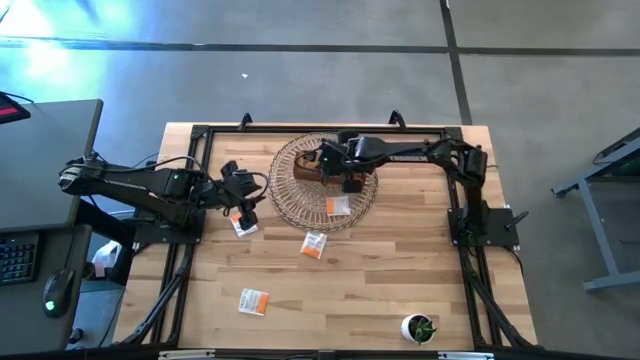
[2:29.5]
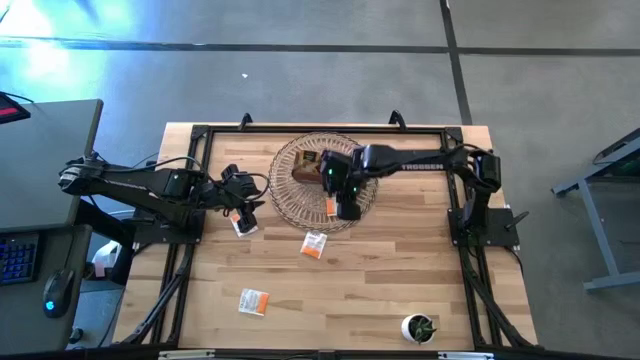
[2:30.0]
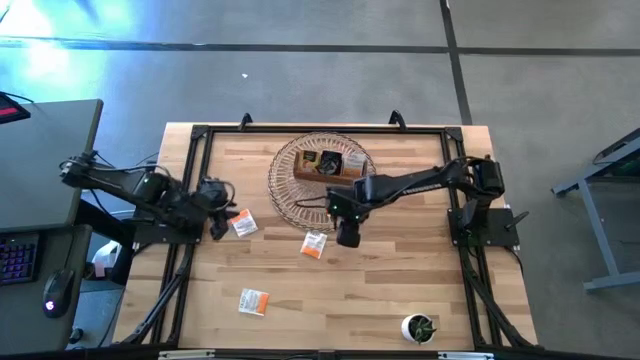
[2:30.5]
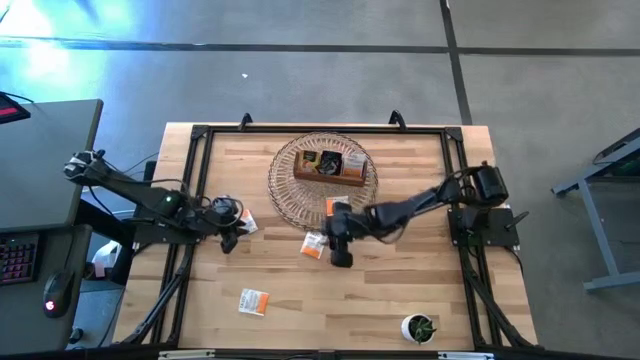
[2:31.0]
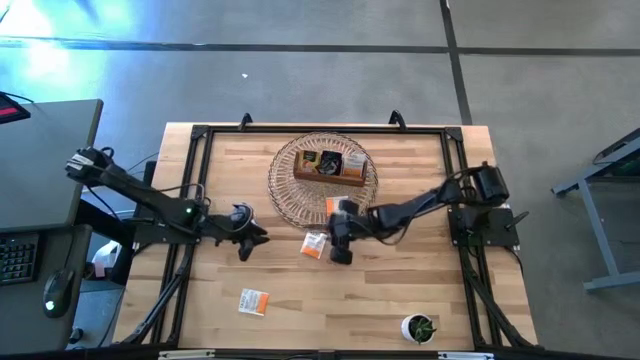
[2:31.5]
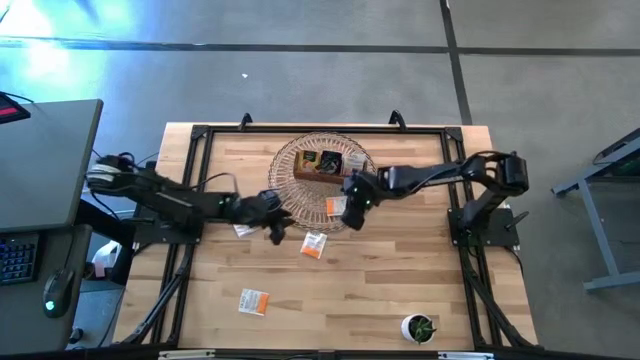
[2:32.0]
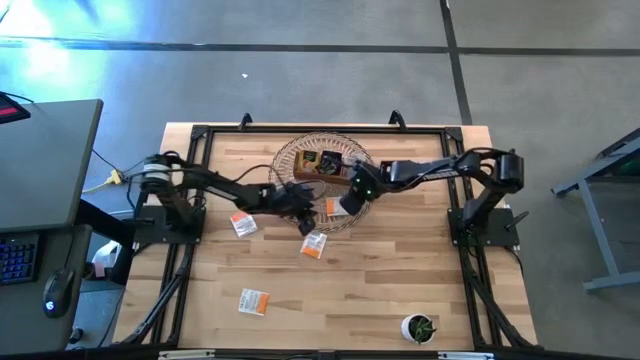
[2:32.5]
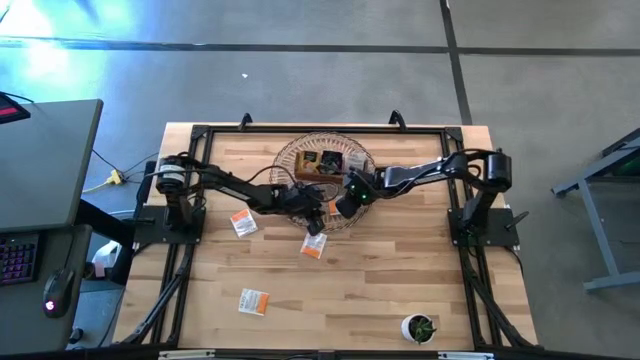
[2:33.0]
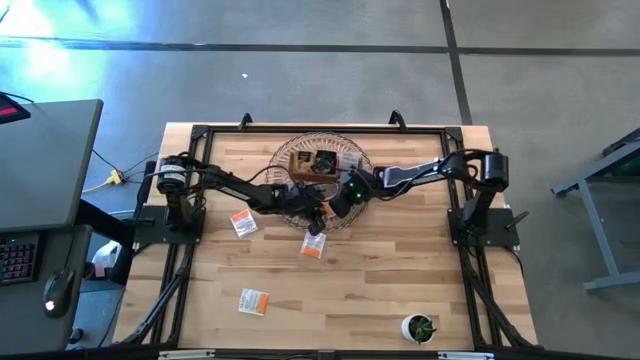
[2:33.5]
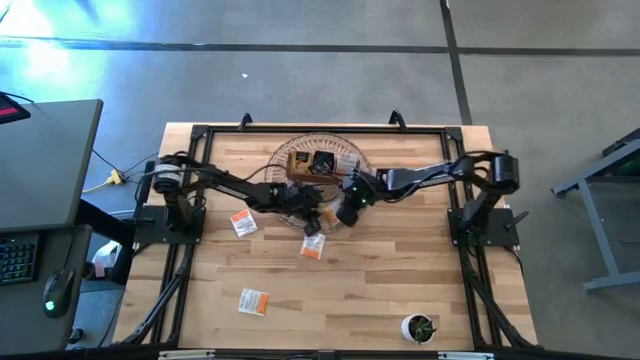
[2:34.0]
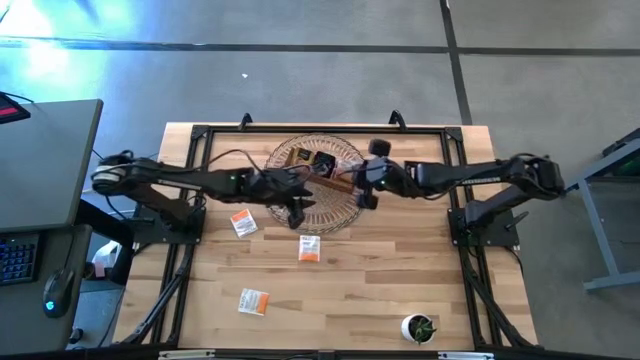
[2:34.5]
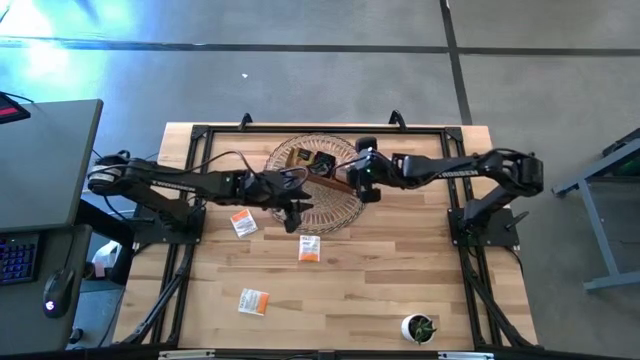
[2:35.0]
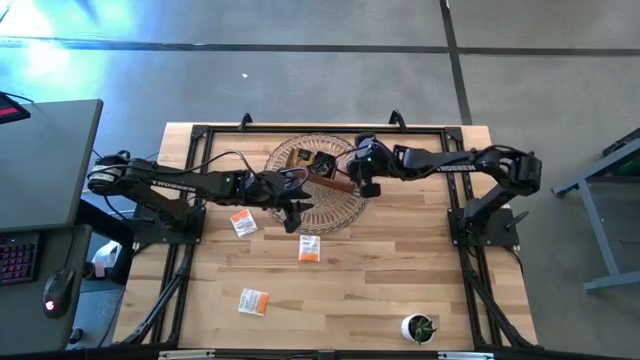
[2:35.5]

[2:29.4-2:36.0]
Task: Pick & Place Tea
Put the white tea bag into the right section of the wooden organizer

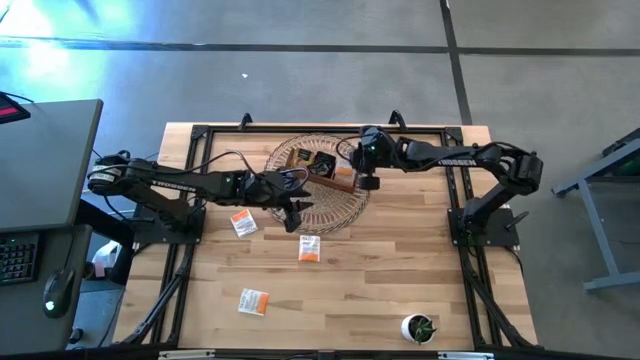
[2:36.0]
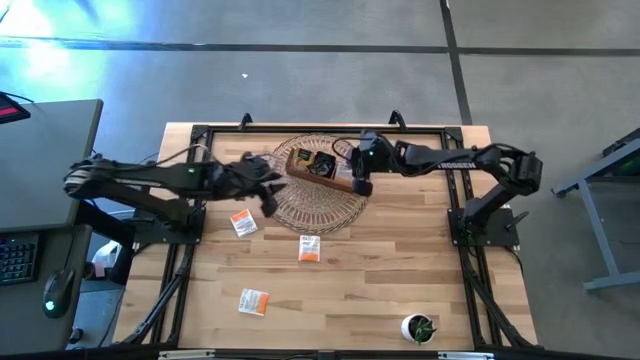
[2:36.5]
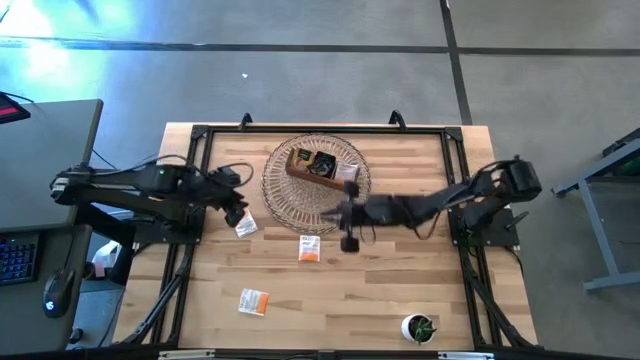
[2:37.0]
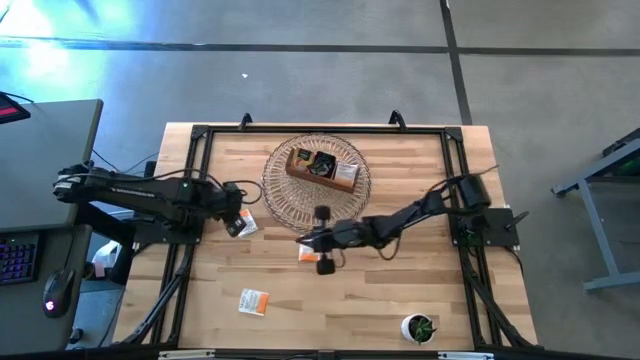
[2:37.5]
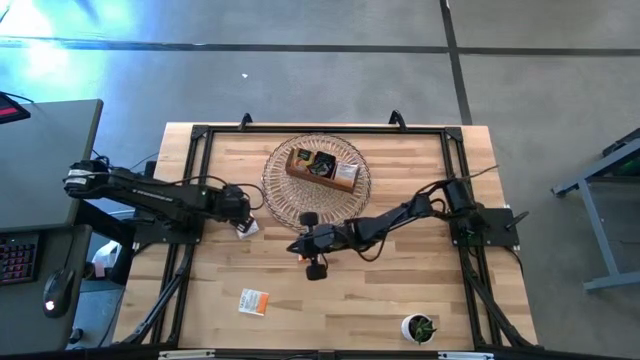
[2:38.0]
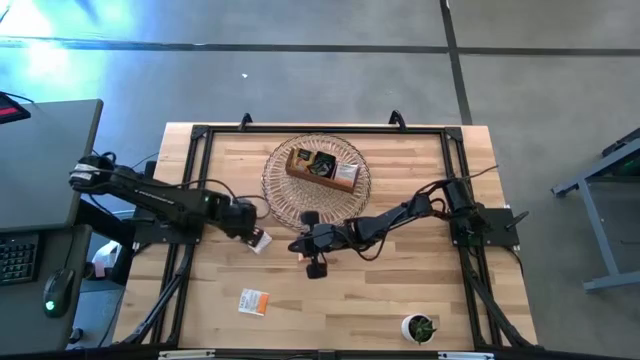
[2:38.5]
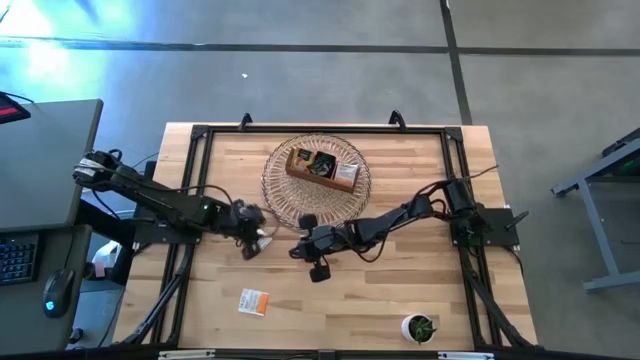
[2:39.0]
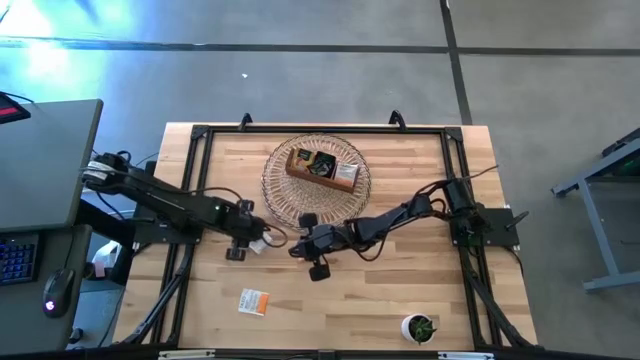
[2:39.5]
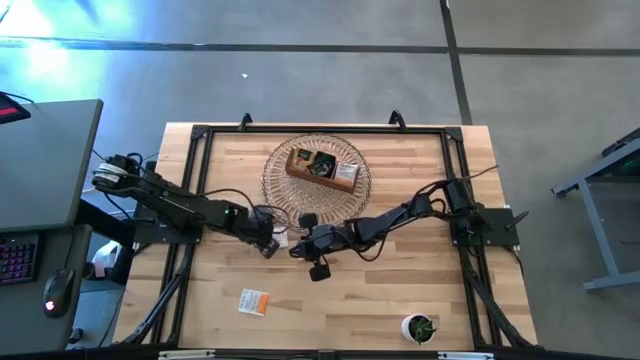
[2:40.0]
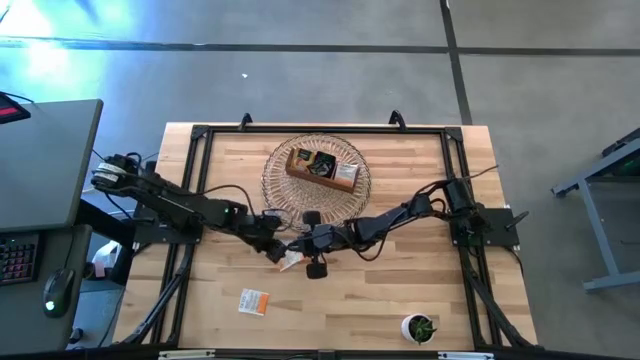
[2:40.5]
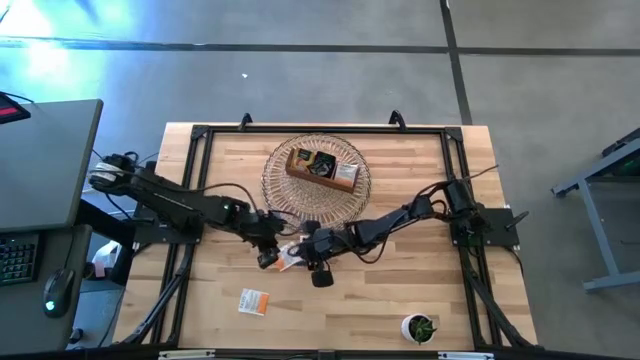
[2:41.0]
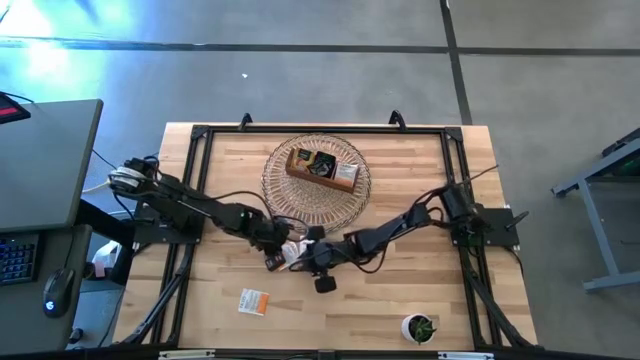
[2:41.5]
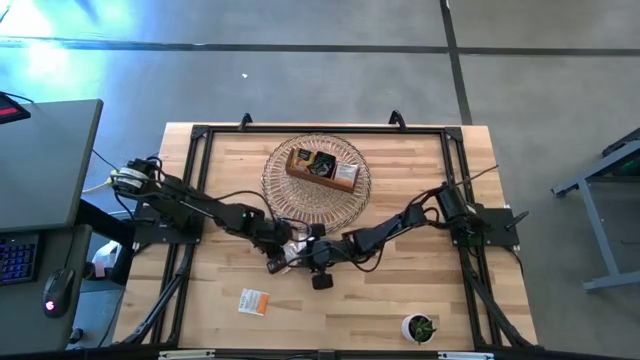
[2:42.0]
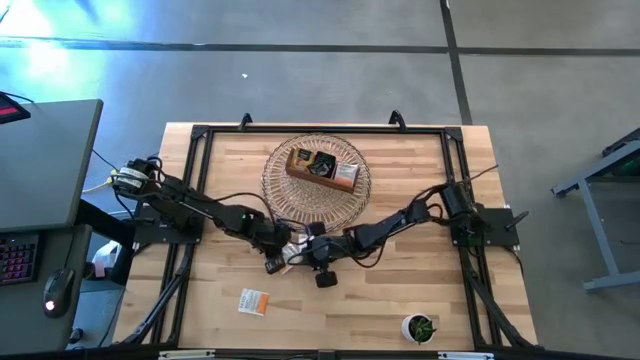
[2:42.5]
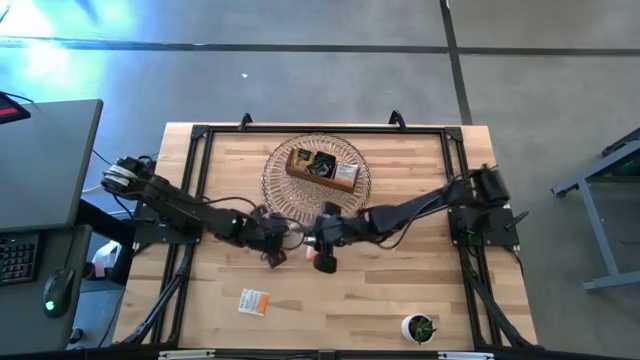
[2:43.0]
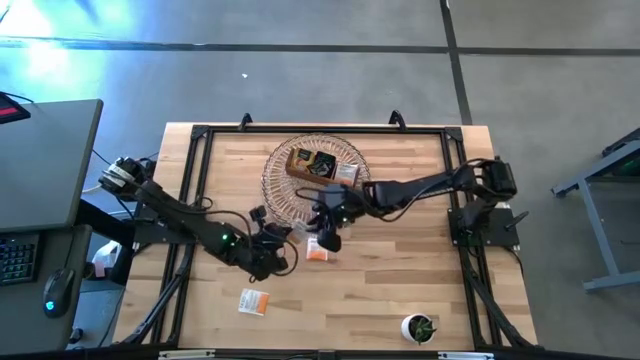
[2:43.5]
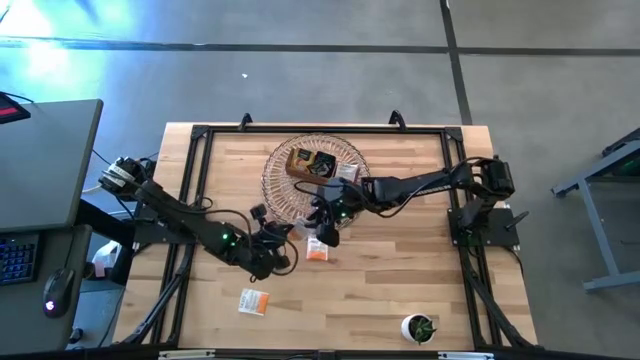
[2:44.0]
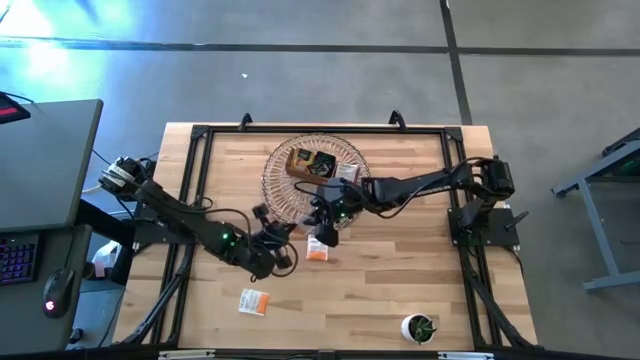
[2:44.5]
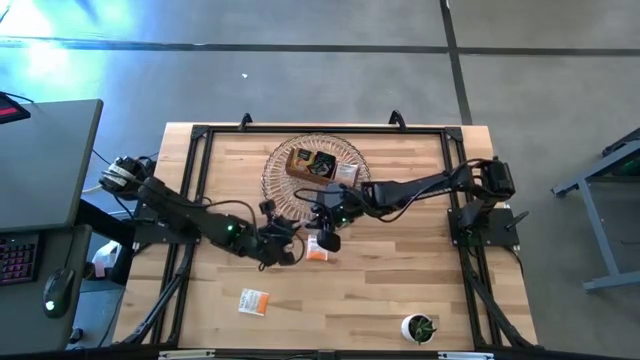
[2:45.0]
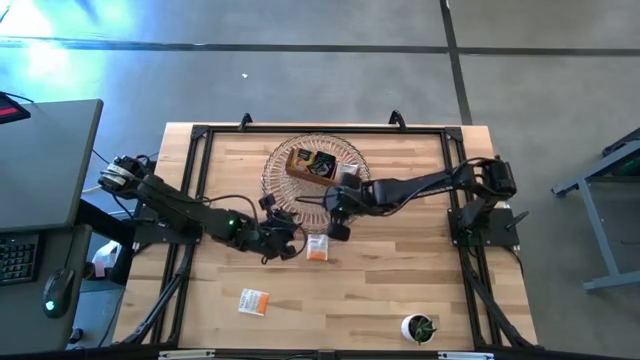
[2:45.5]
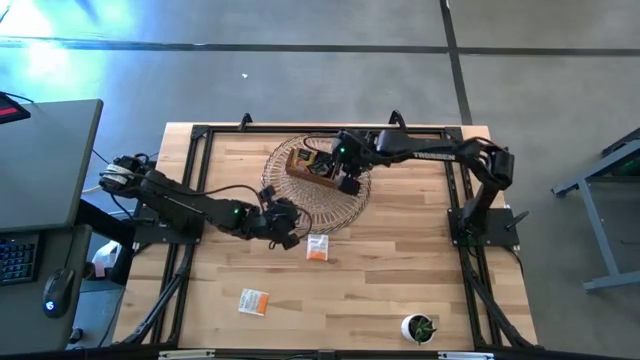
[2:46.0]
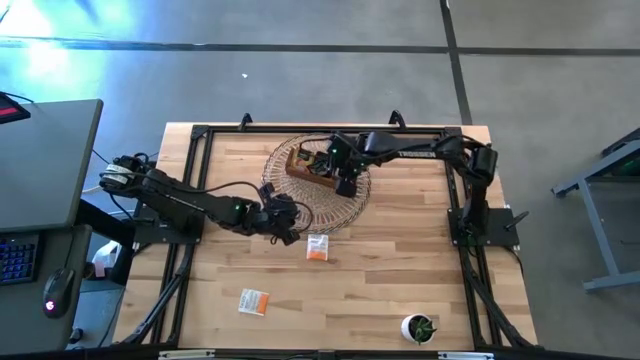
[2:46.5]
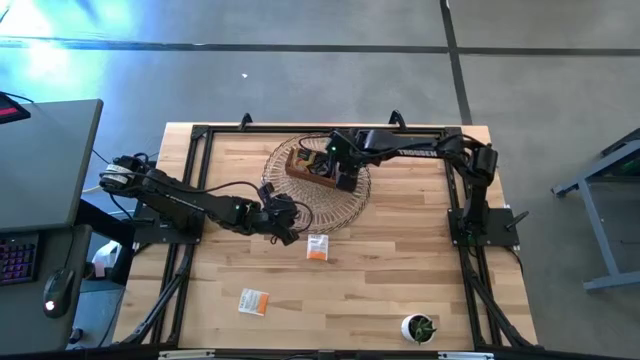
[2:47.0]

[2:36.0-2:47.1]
Put the white tea bag into the right section of the wooden organizer

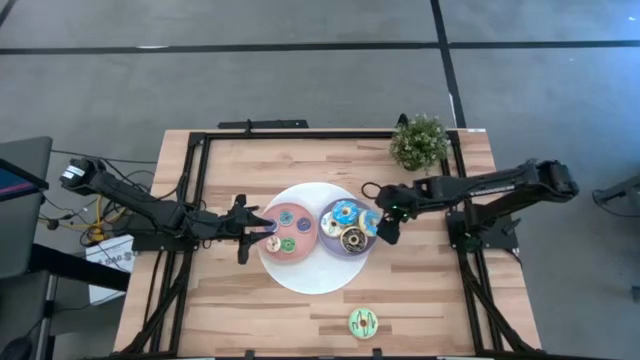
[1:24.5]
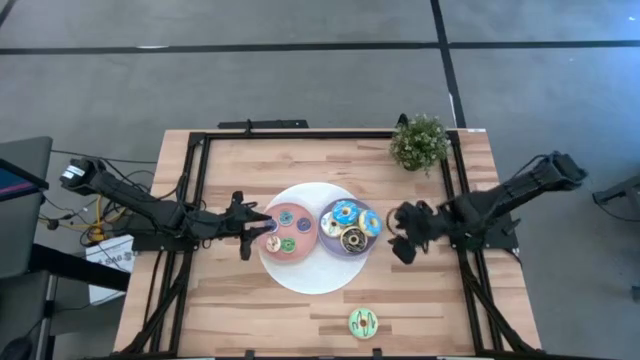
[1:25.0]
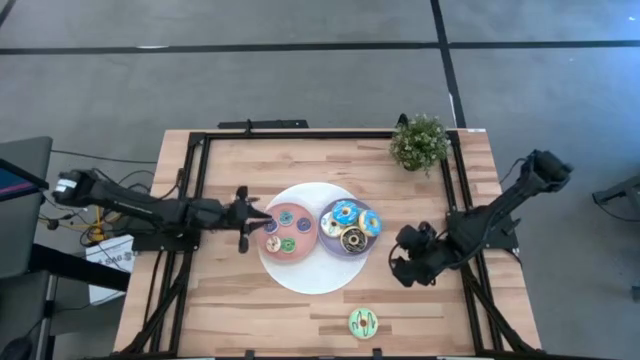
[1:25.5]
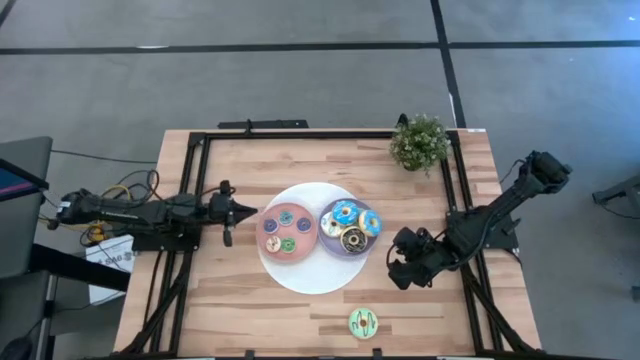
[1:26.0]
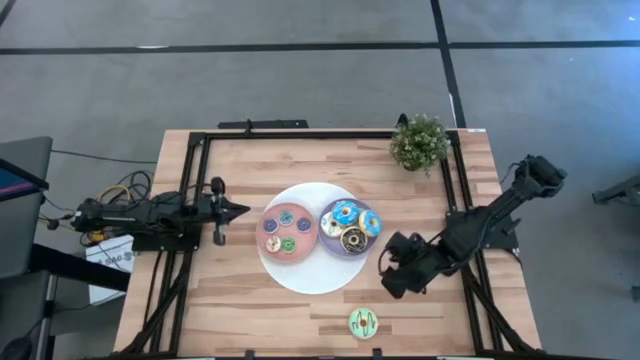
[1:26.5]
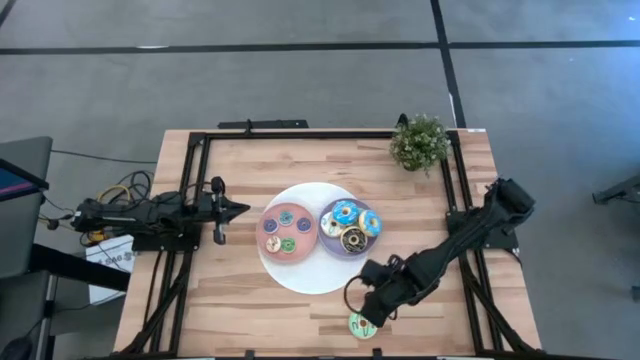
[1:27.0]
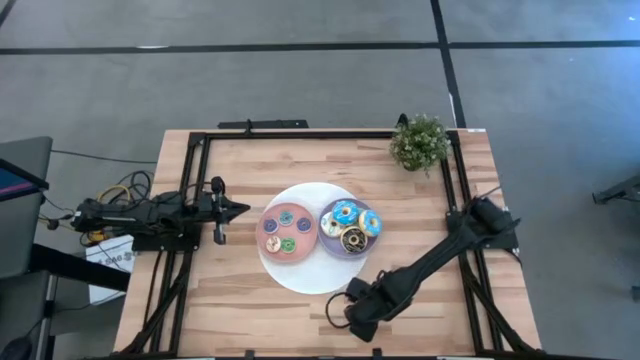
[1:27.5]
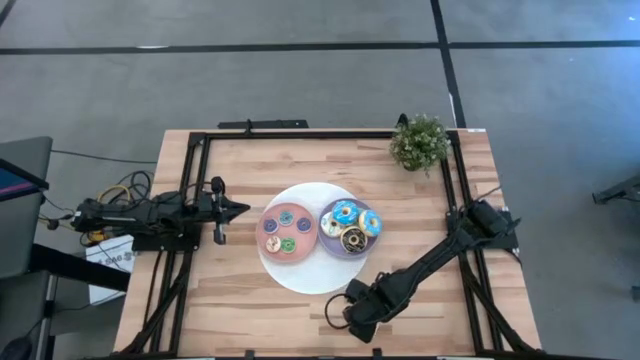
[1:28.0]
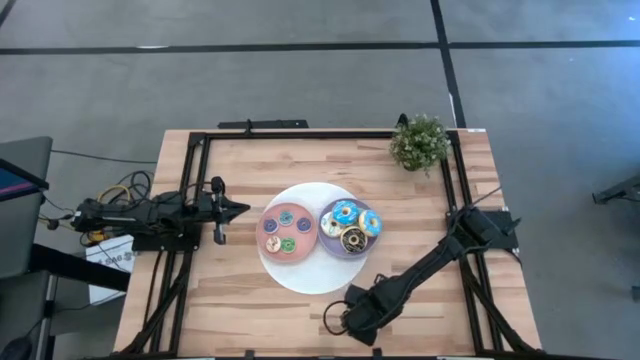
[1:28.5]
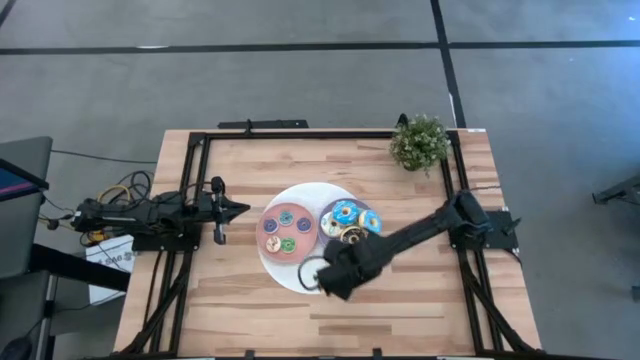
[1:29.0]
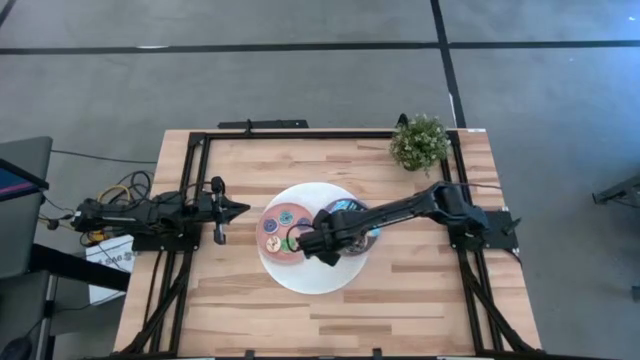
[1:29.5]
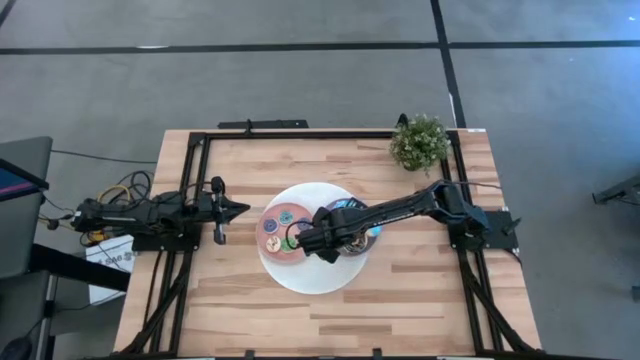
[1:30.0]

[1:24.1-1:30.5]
Task: Pick & Place donuts
Put the big light green donut on the violet plate
